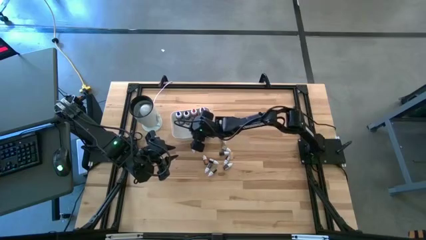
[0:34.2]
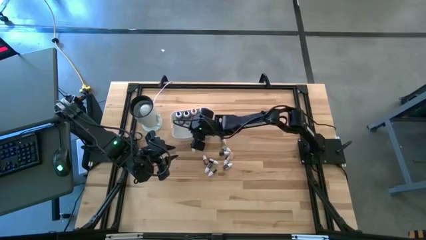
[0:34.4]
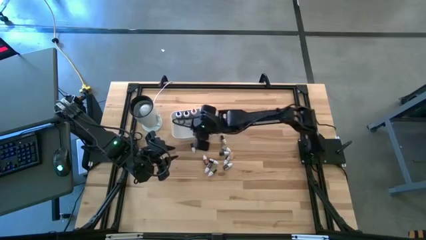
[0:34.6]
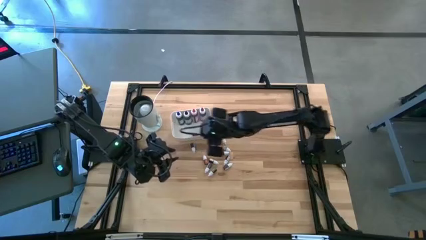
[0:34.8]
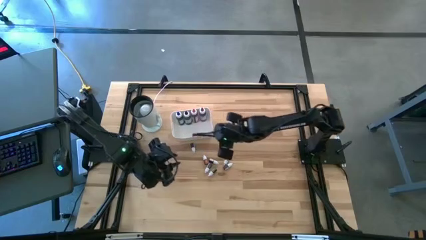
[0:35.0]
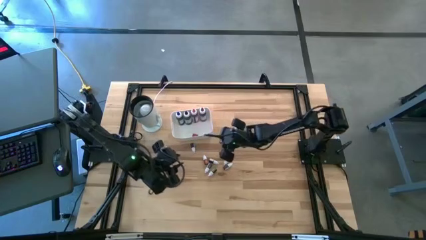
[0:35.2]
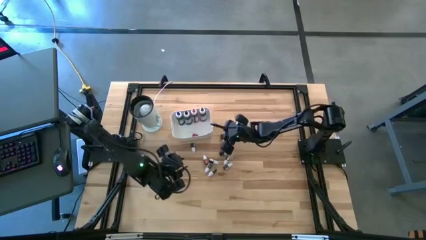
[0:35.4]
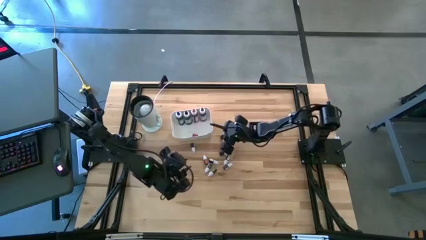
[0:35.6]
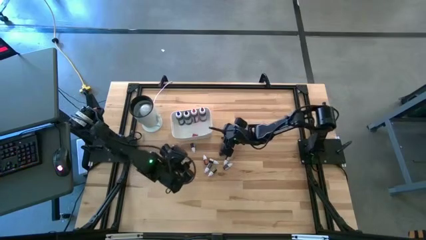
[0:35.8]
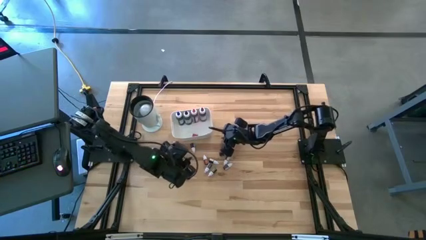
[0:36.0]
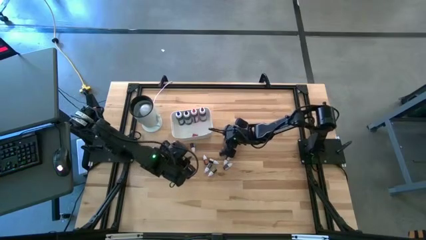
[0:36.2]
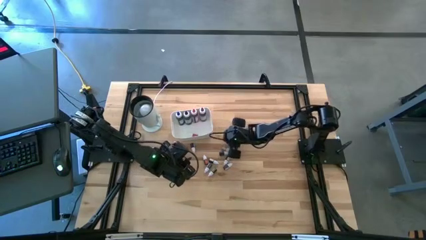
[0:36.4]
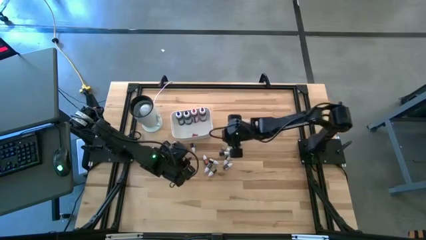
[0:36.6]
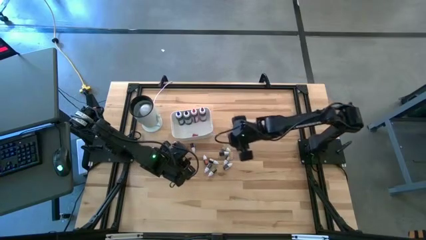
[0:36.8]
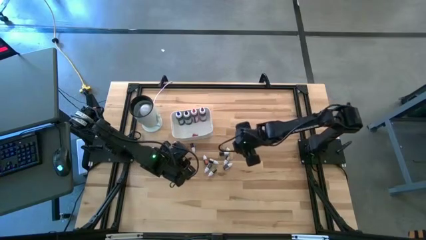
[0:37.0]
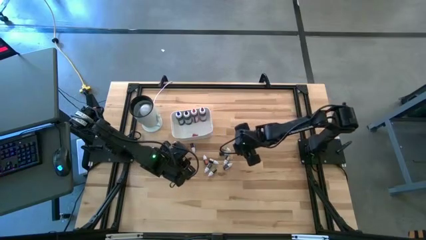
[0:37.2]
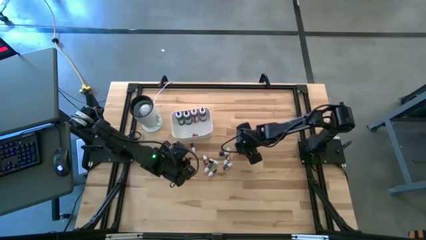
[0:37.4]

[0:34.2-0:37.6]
Task: Pick & Place food coloring
Put the small blue food coloring bottle into the white bin

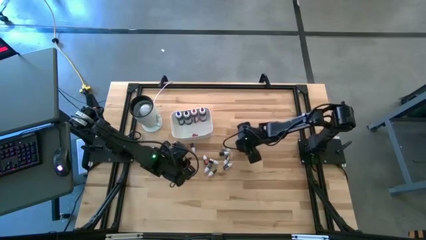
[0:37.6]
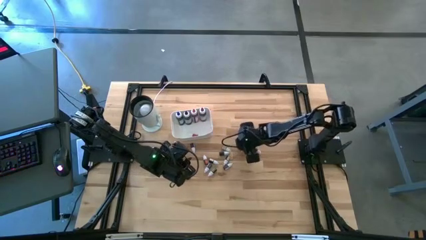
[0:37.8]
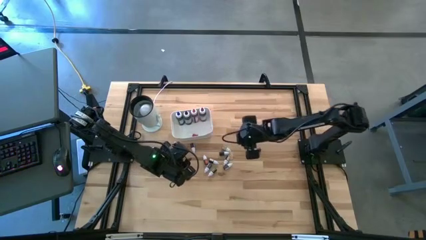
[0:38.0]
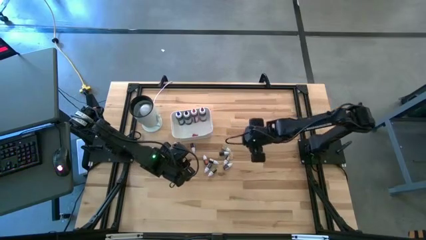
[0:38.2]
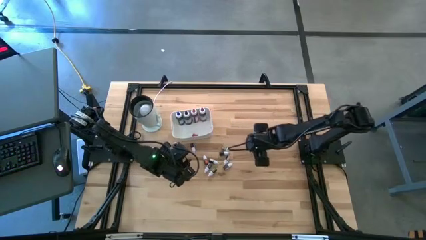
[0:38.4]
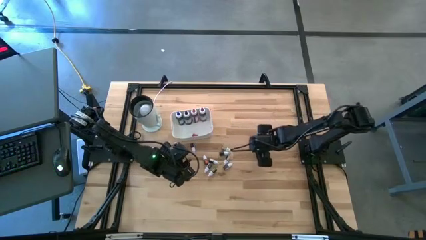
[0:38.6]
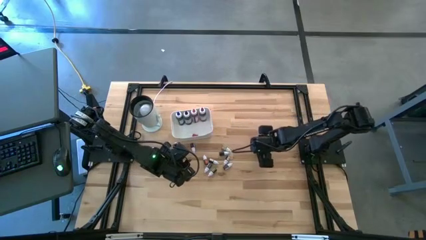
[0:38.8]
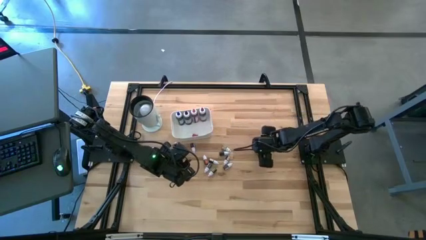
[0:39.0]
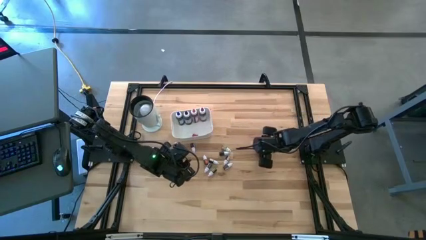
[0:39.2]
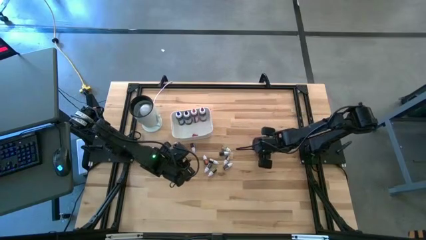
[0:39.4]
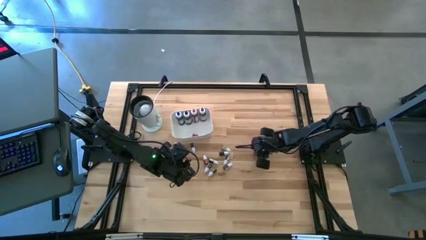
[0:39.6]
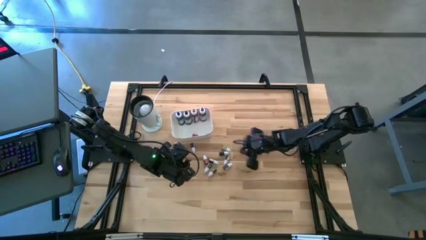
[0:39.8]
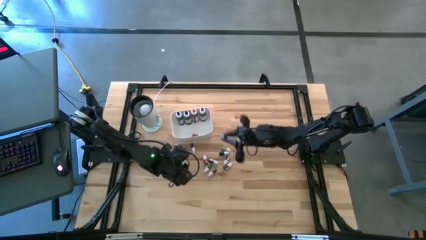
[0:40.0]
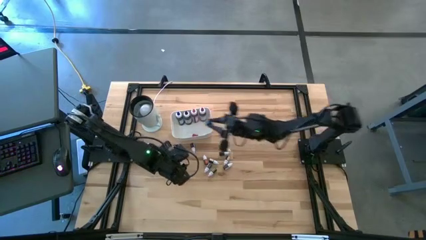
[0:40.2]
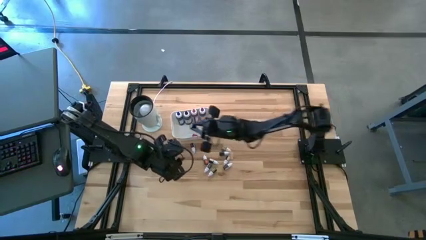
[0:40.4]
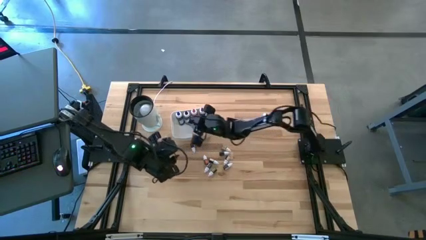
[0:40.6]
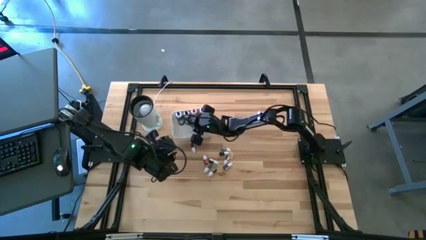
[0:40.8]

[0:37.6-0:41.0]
Put the small blue food coloring bottle into the white bin

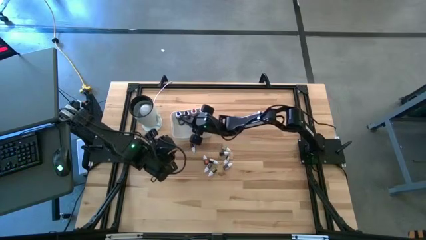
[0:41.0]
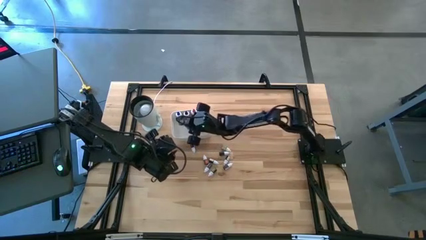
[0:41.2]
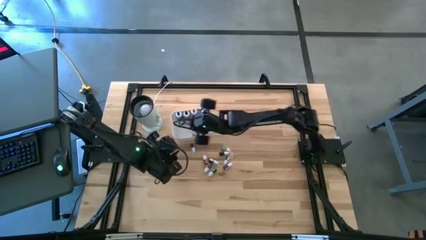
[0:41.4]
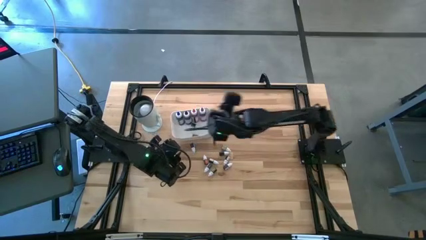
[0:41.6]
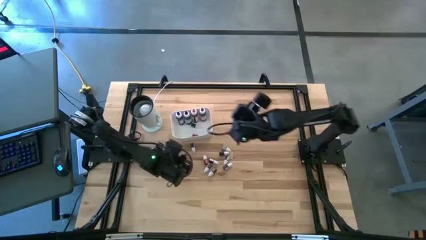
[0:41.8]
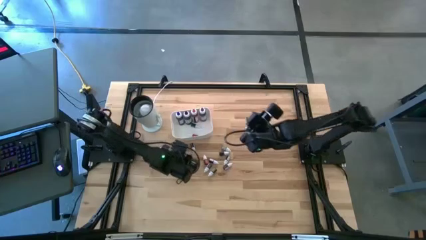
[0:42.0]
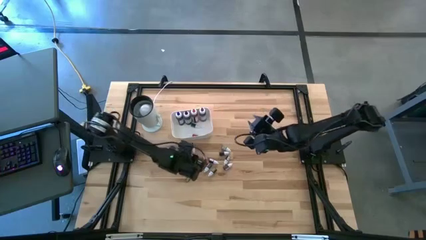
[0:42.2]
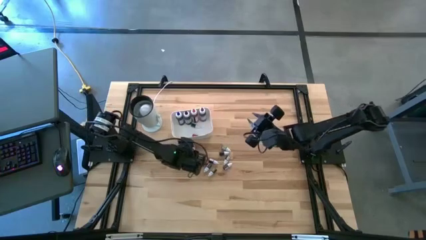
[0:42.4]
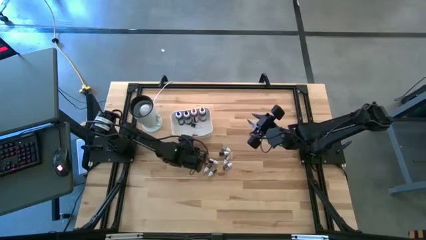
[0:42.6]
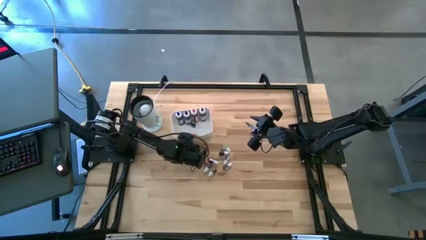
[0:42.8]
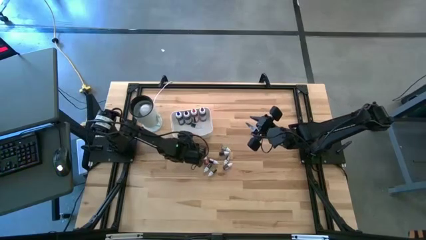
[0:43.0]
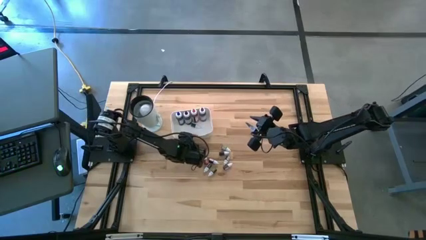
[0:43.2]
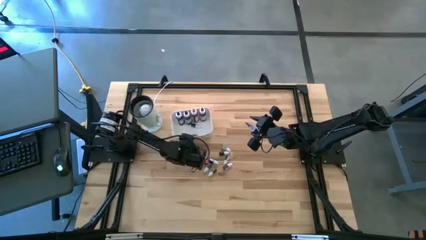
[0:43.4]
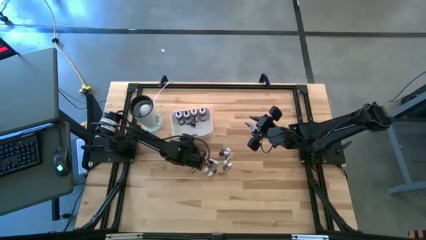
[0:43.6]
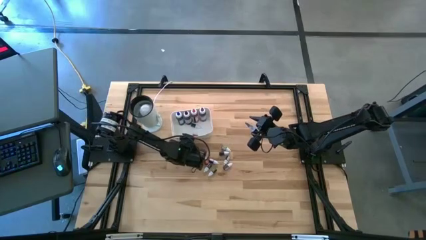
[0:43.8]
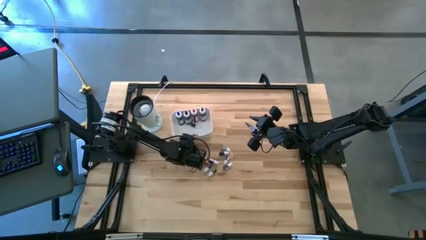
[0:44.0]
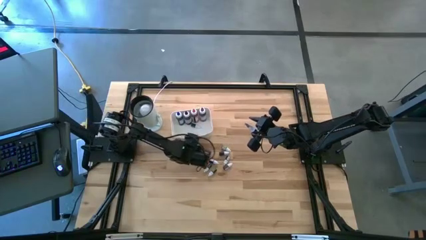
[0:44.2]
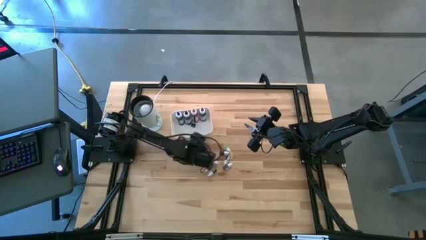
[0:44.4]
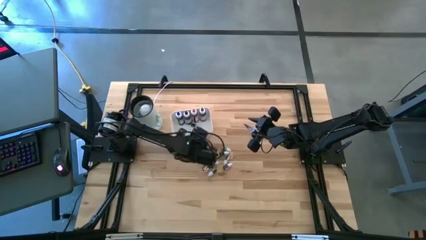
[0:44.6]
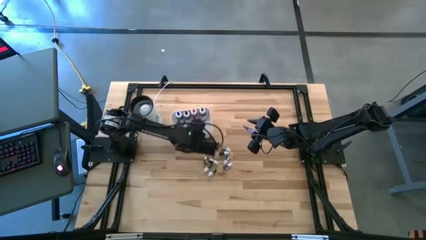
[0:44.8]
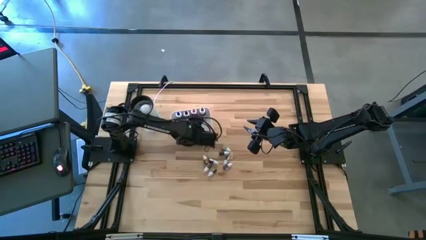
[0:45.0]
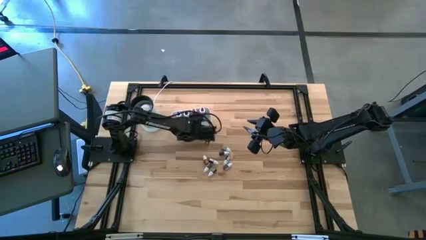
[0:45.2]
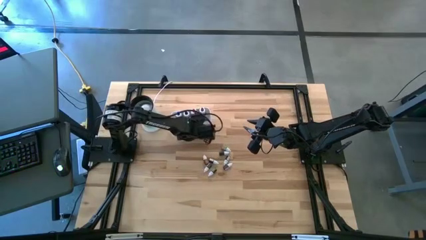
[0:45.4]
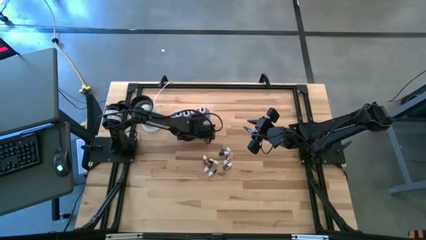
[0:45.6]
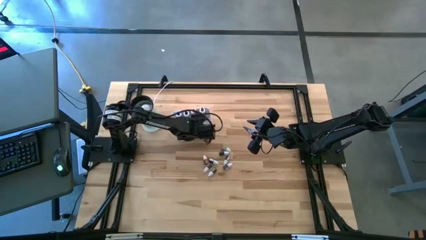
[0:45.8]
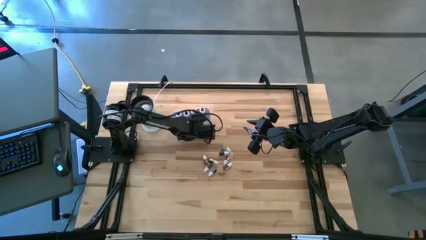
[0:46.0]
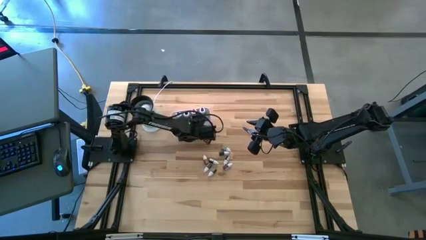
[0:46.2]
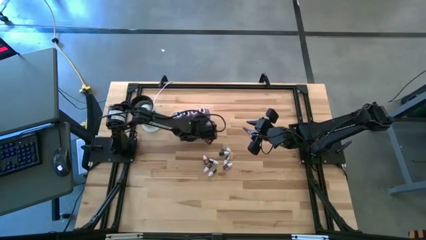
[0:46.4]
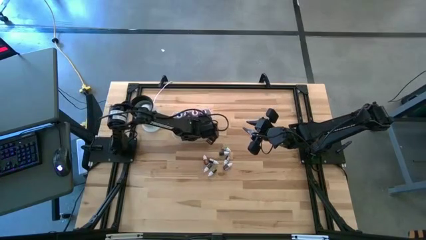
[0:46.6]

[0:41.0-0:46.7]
Put the small violet food coloring bottle into the white bin

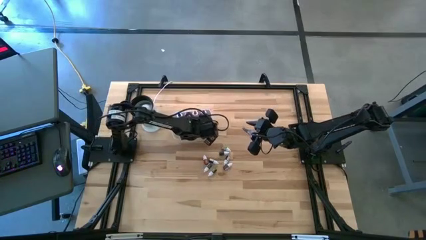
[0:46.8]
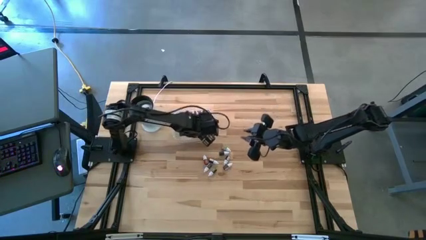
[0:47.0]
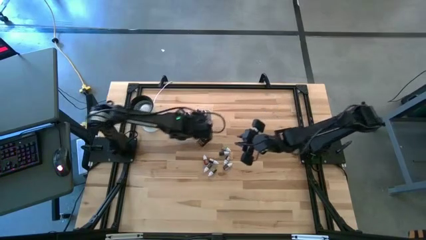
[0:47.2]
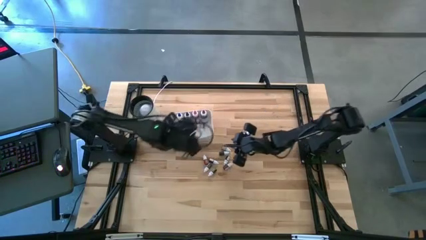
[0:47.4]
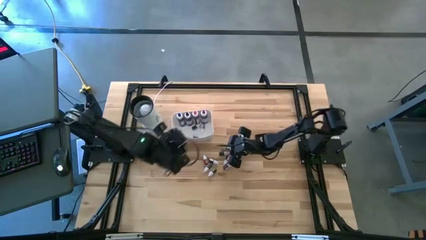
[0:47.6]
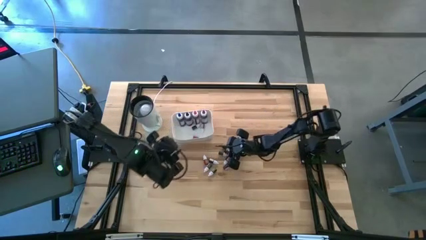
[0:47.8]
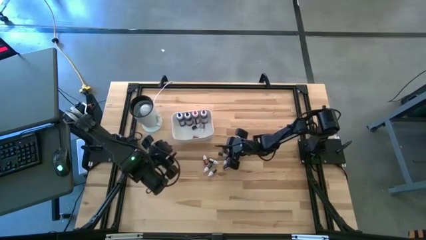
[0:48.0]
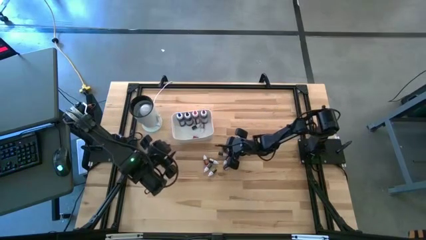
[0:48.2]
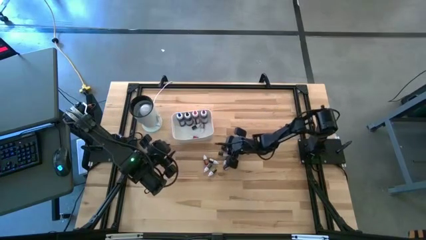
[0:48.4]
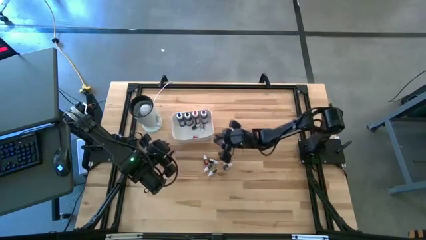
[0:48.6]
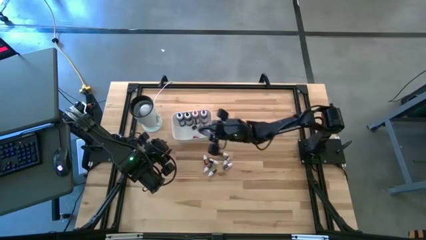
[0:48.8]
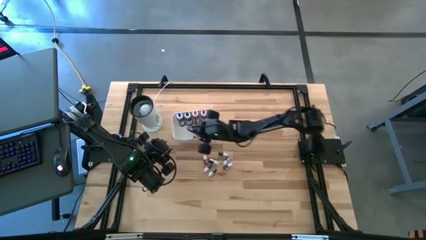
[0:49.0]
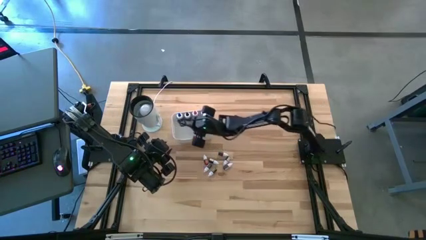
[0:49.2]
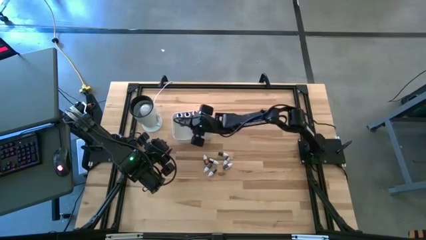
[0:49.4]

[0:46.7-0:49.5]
Put the small green food coloring bottle into the white bin

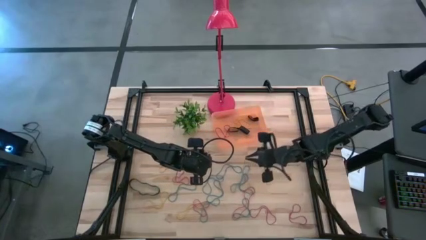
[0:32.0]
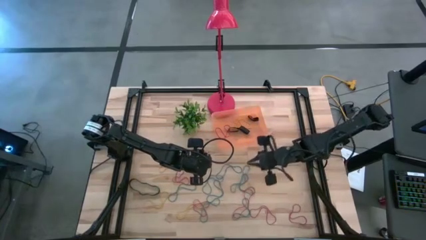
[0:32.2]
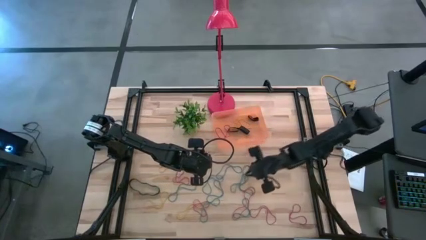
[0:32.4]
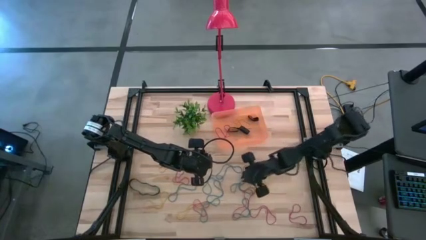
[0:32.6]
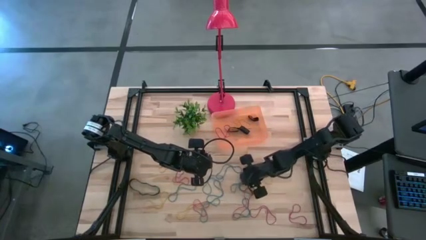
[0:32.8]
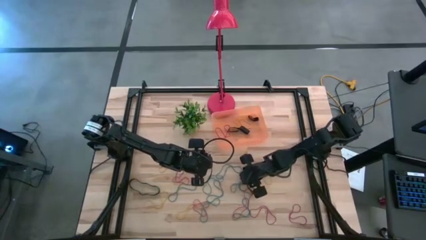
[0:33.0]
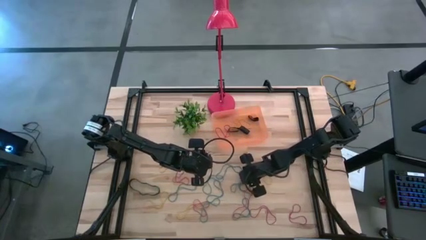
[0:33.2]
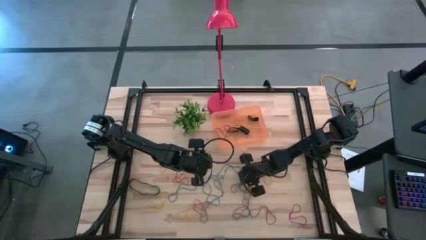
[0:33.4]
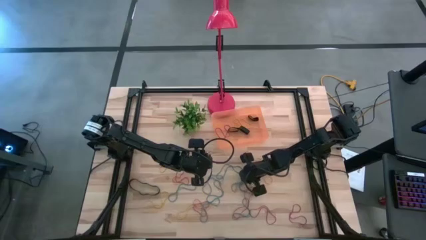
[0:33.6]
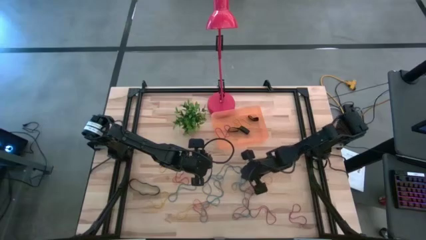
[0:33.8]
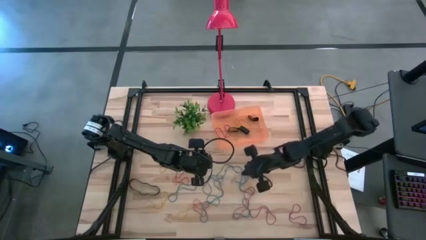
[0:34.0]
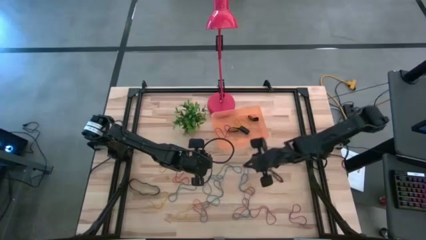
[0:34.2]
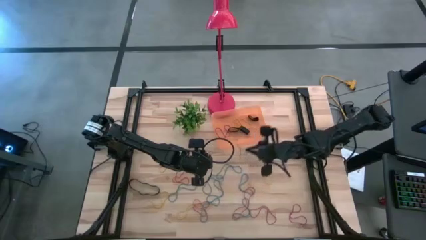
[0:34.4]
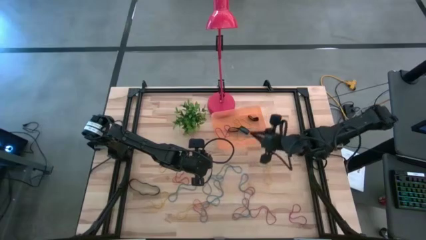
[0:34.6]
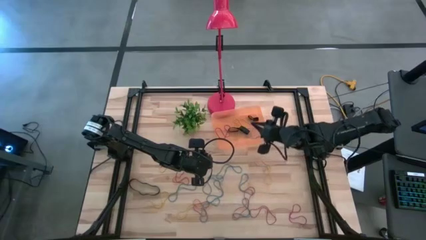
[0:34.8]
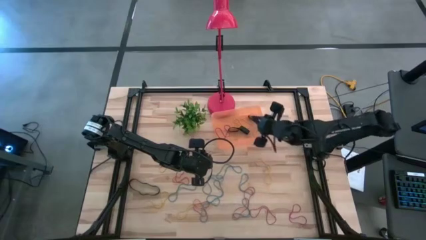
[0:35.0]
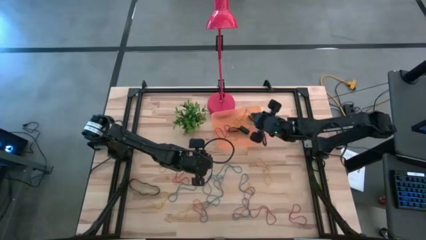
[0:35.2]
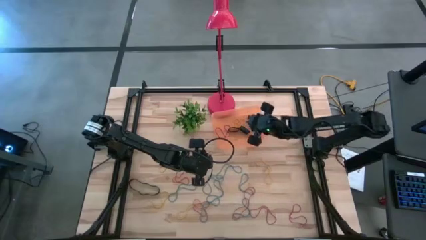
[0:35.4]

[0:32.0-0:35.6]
Task: Pick and place rubber bands into bin
Put the blue rubberband into the orange container
